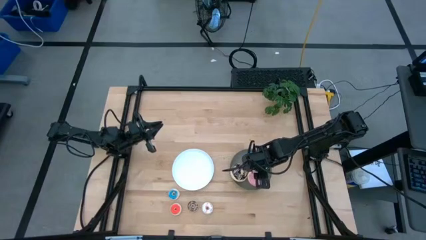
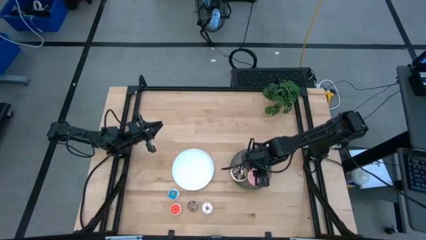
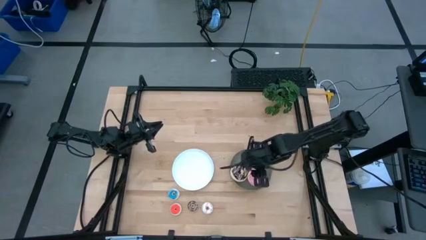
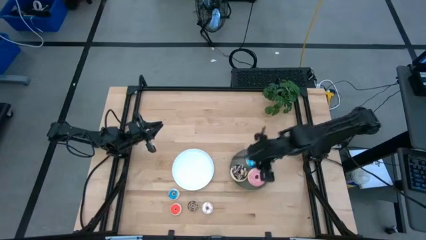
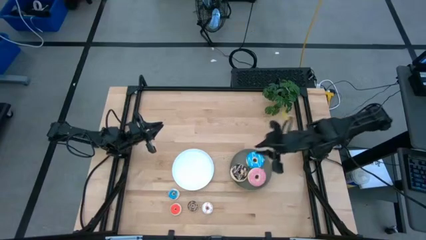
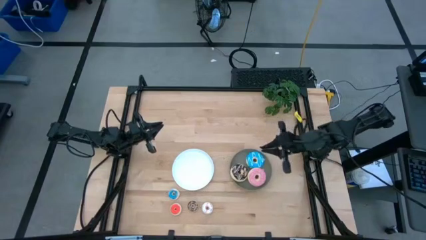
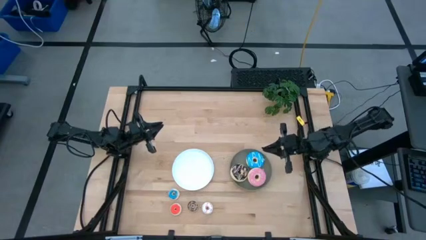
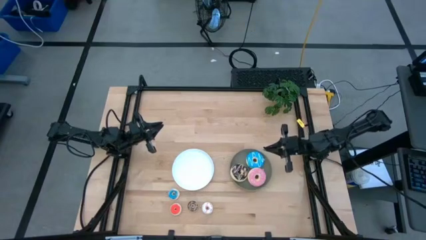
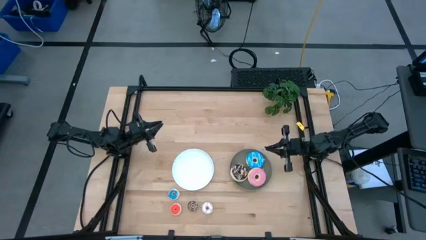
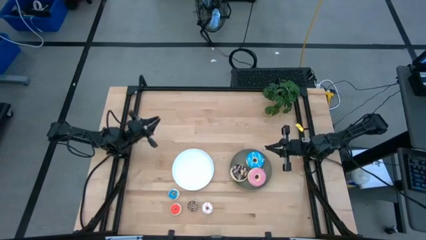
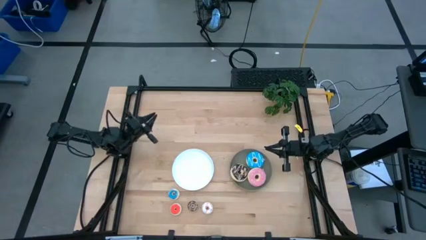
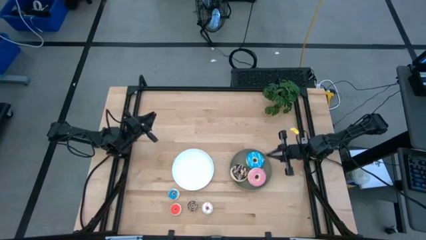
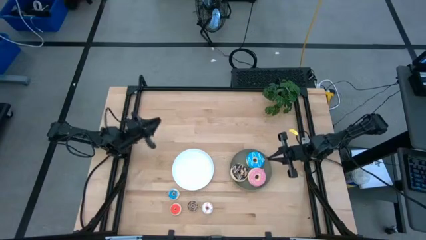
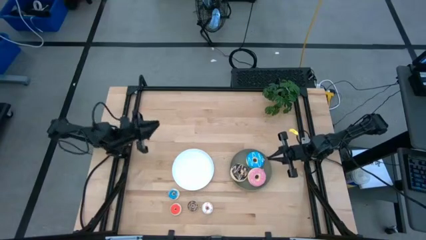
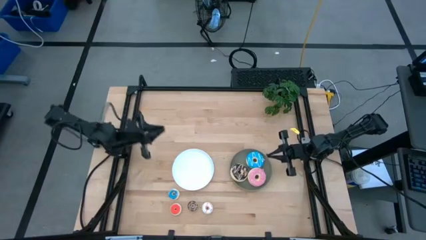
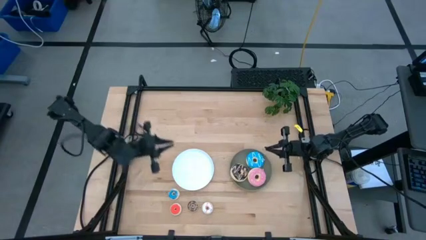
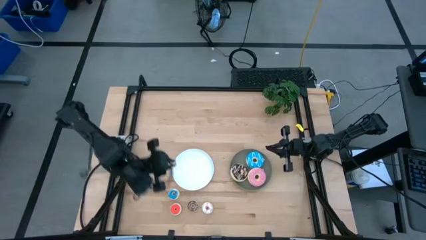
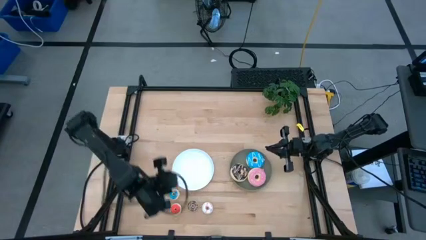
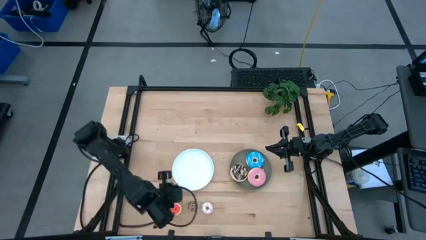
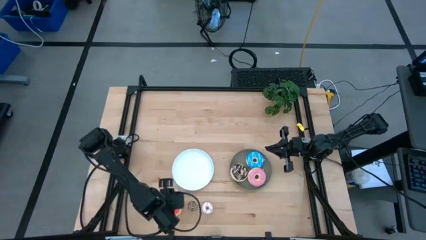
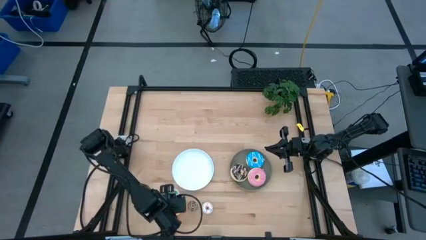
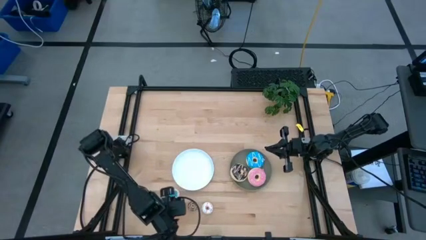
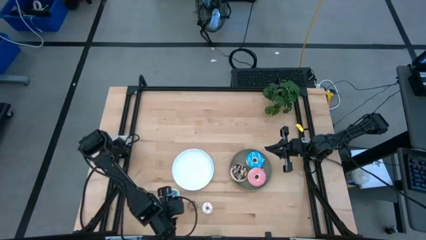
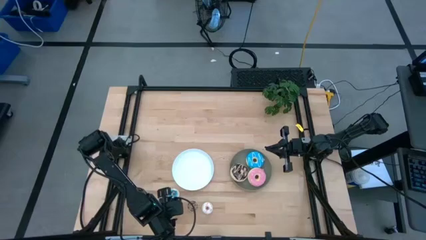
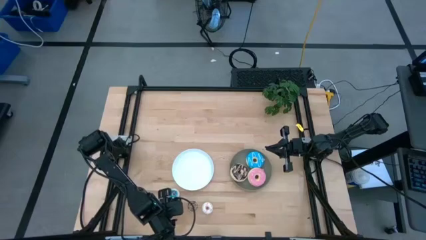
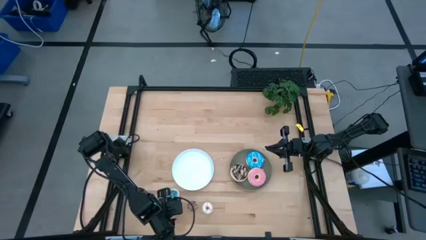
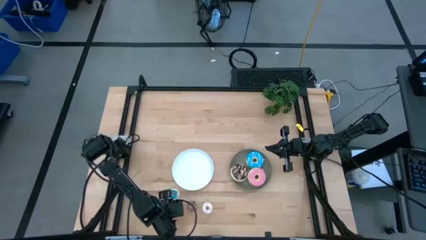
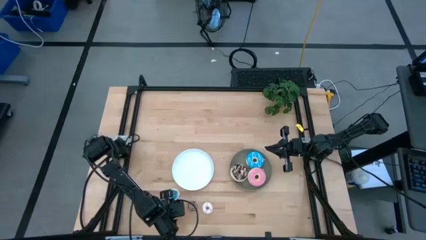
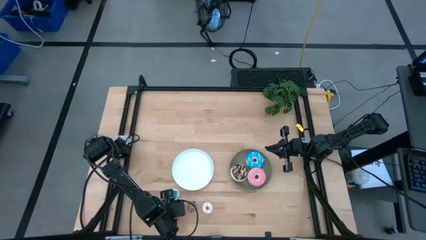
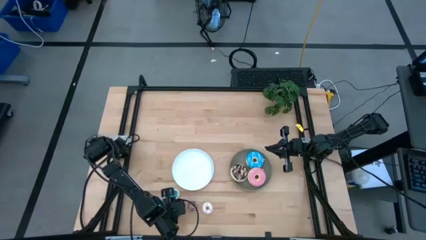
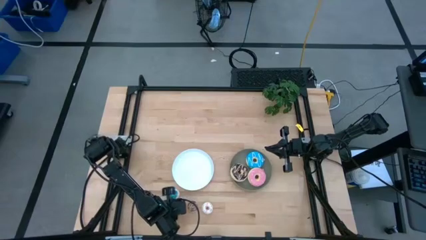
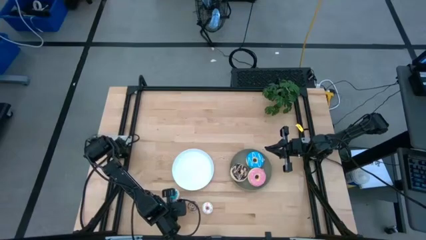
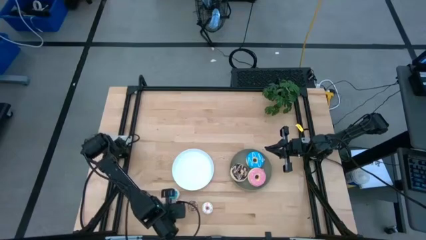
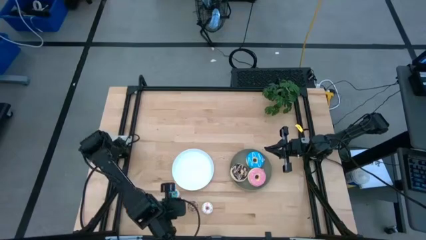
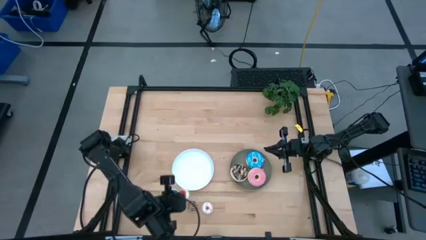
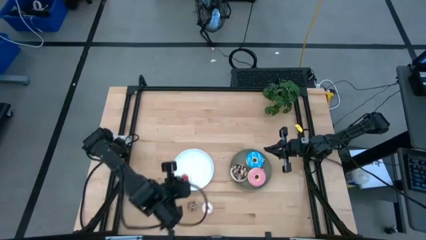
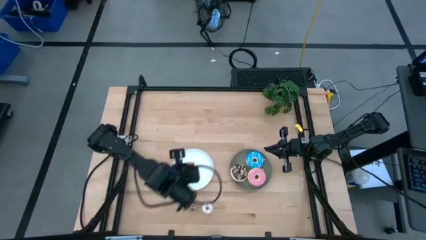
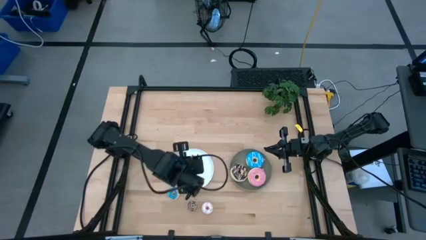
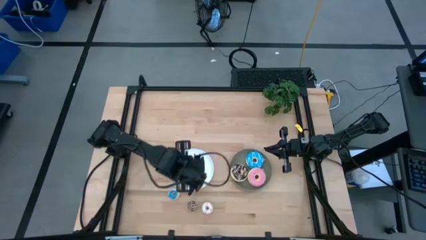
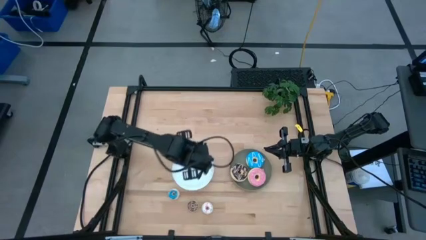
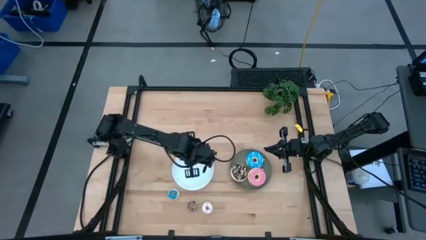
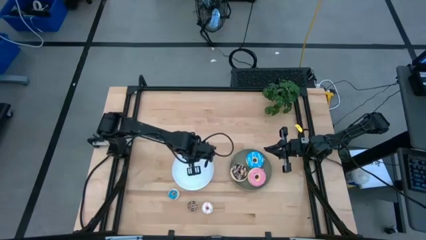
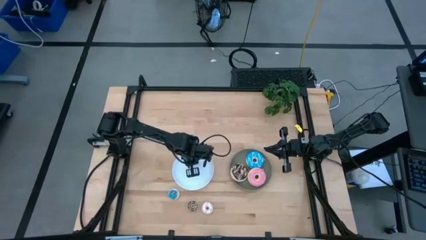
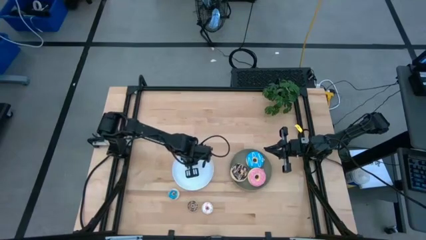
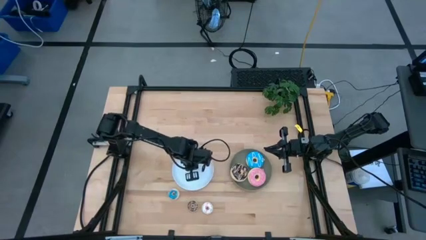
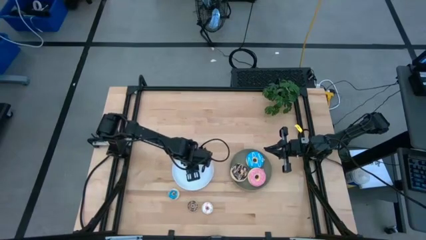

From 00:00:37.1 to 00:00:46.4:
Task: Pick & Place donuts
Put the small orange donut on the white plate

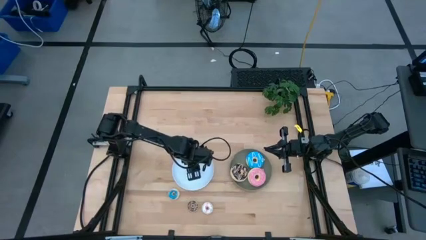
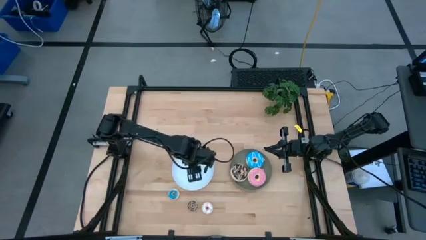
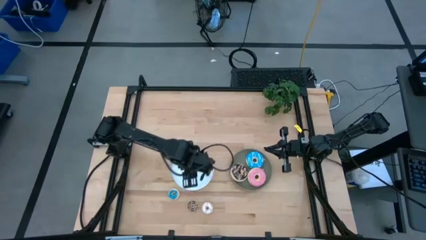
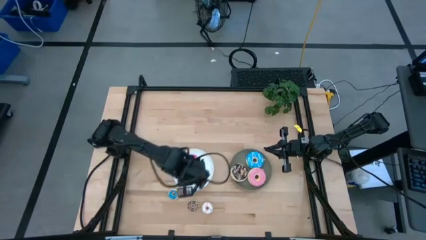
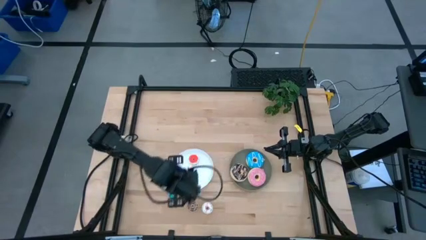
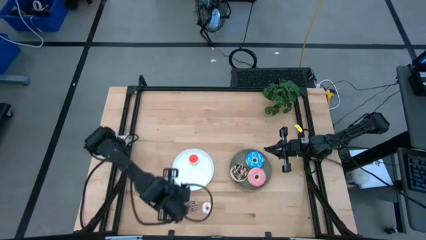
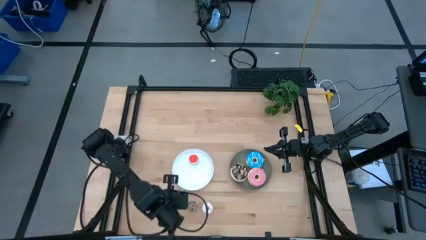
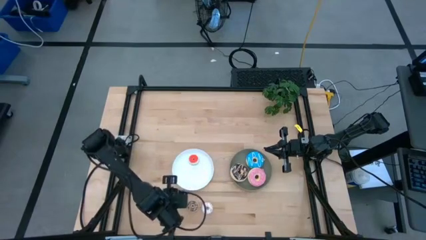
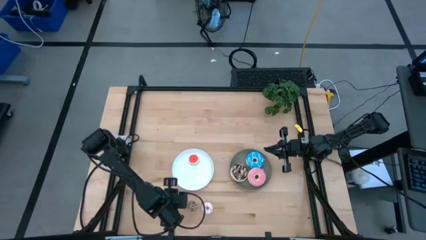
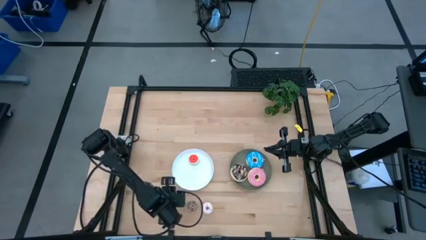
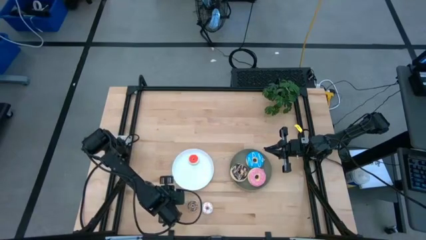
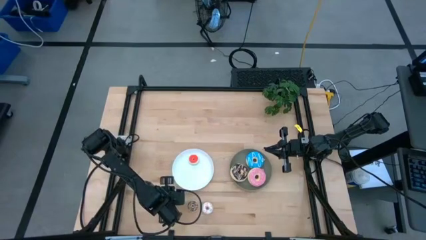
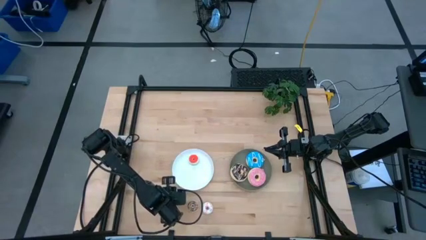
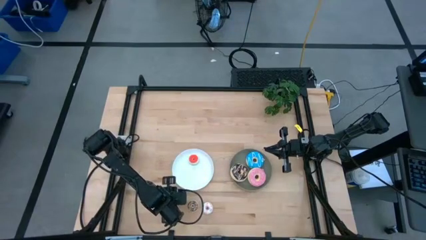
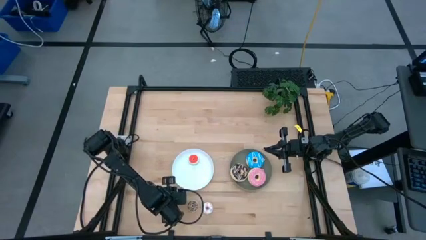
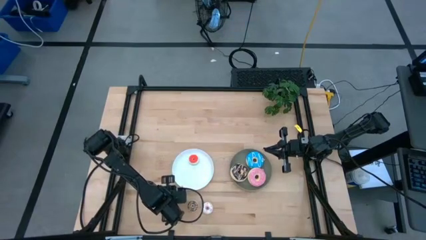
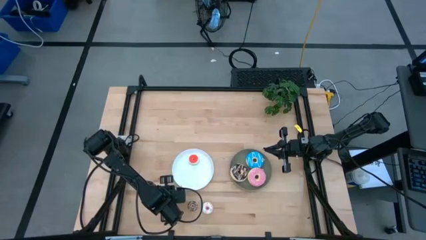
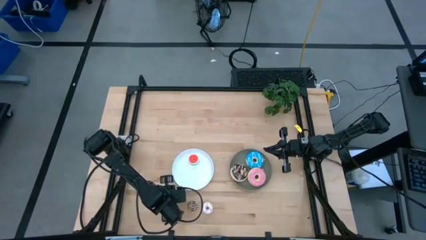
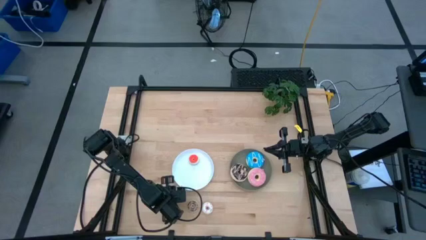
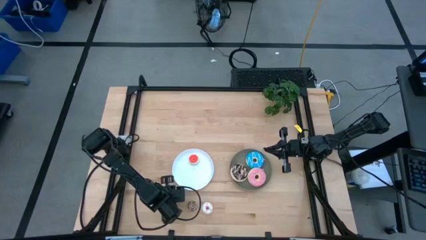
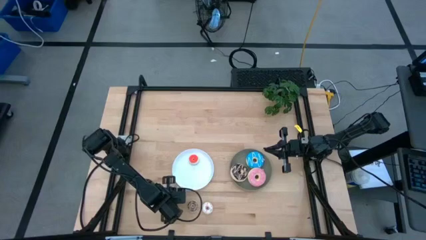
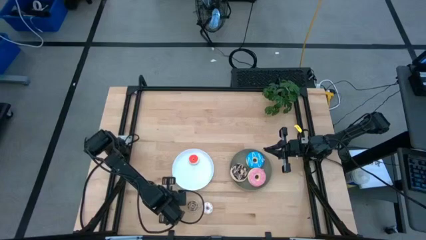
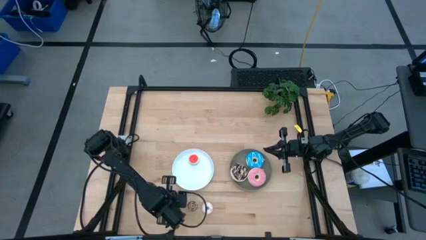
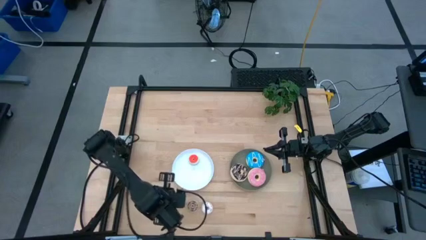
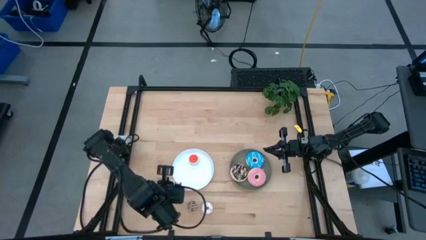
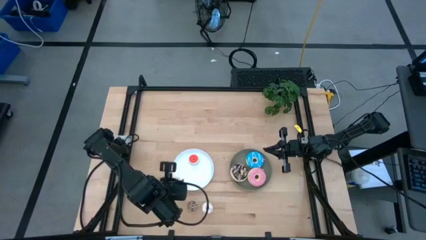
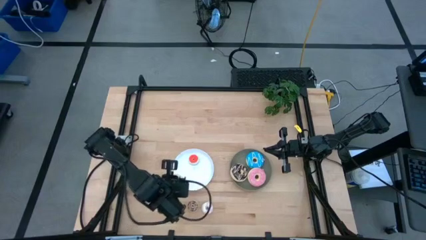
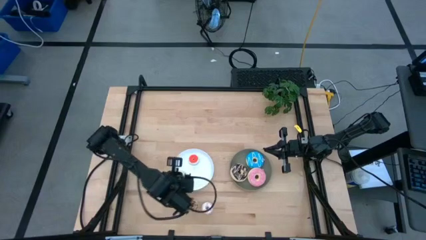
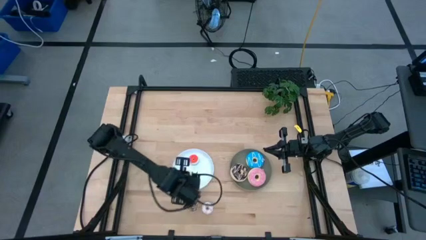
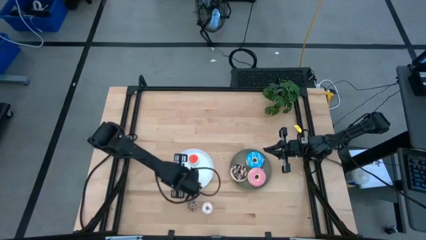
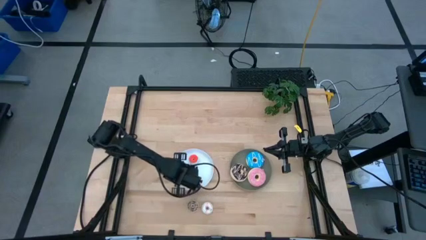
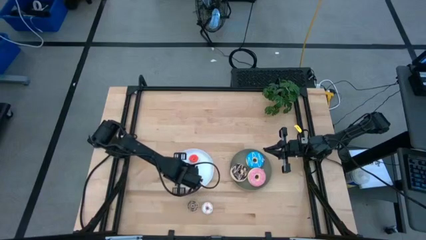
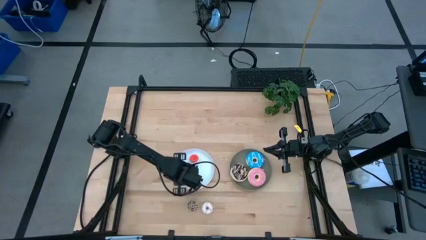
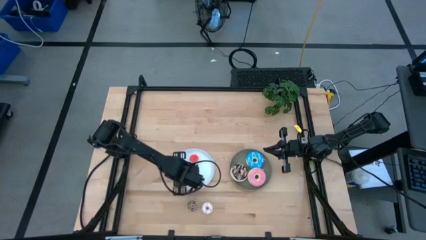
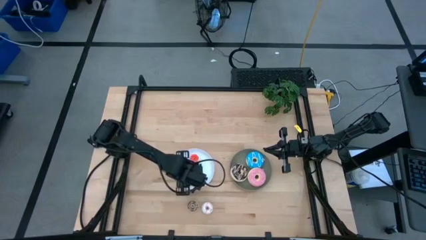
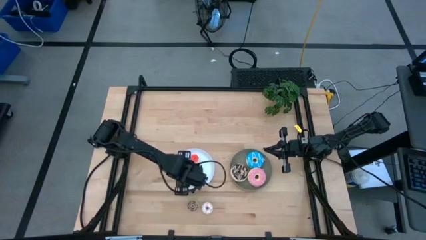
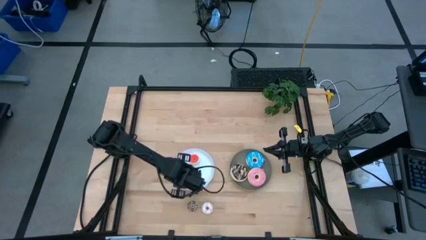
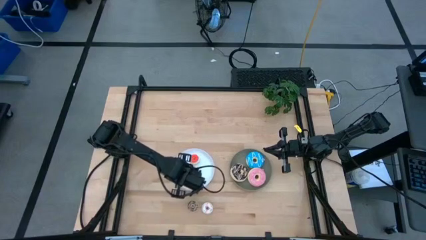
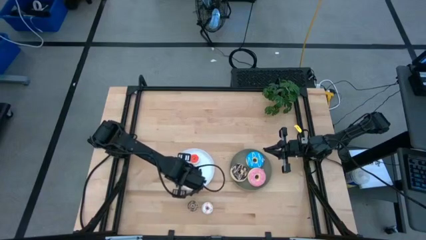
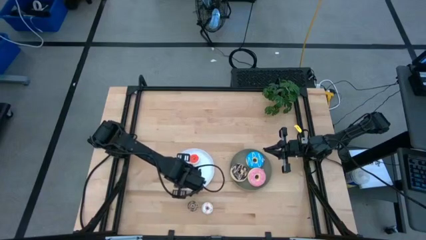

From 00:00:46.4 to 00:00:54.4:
Put the small blue donut on the white plate
